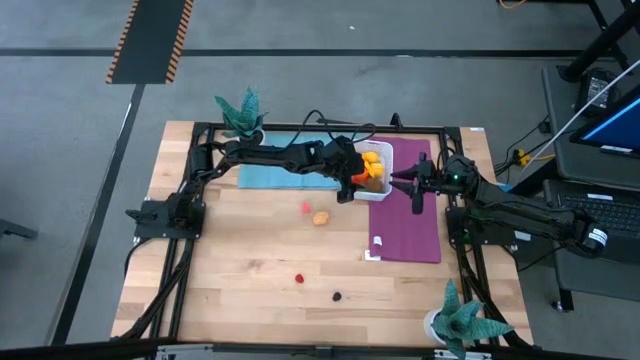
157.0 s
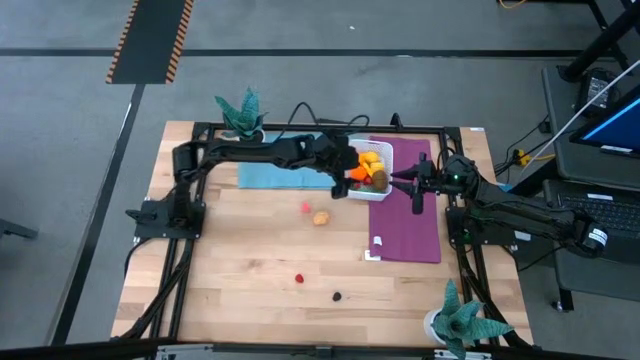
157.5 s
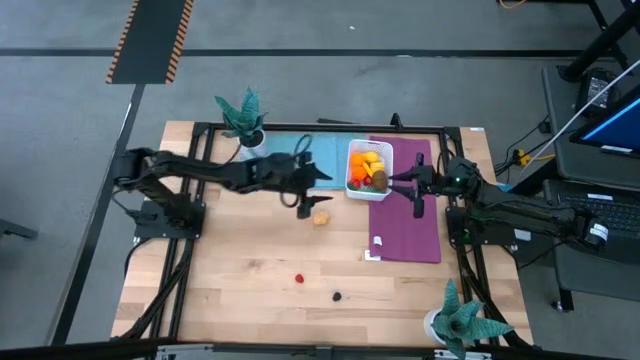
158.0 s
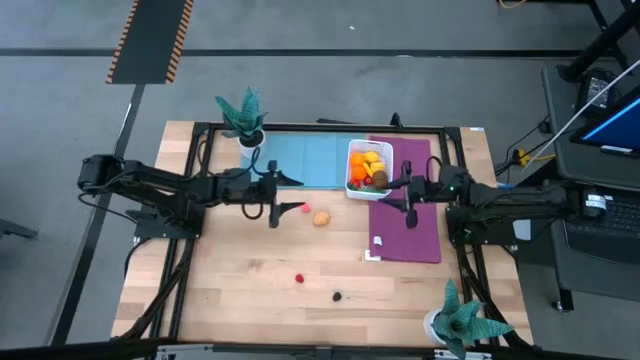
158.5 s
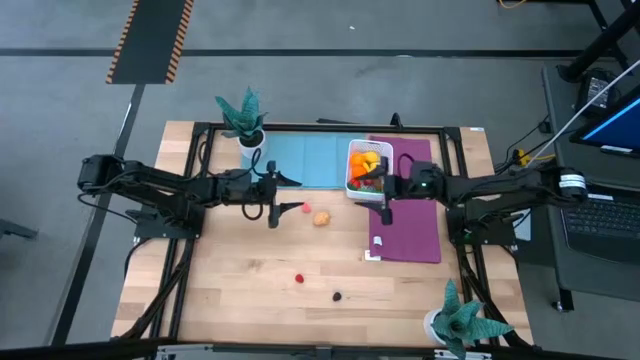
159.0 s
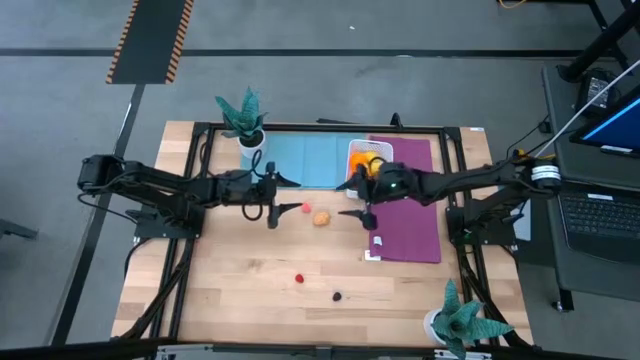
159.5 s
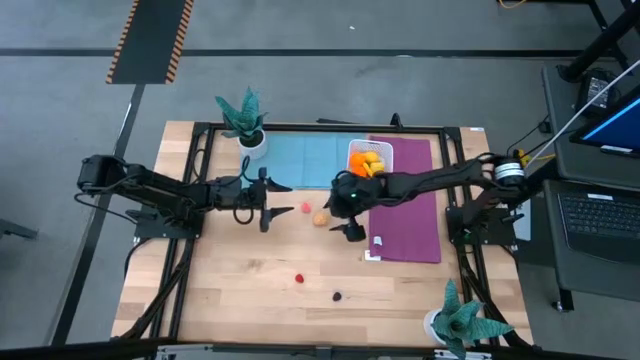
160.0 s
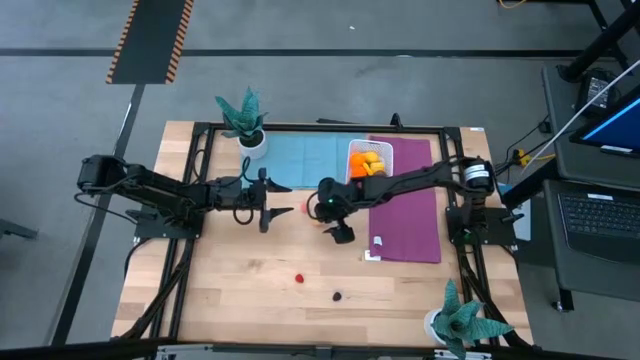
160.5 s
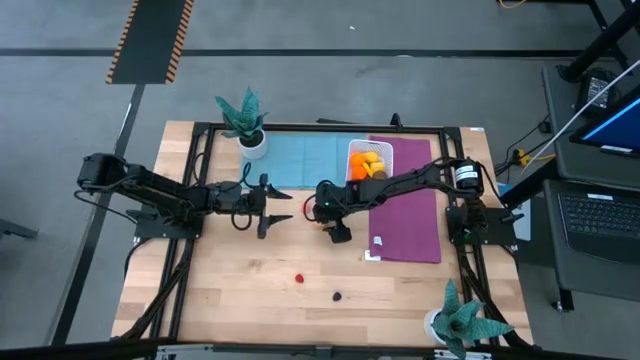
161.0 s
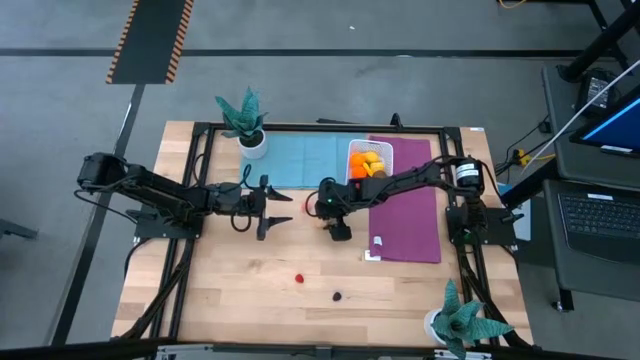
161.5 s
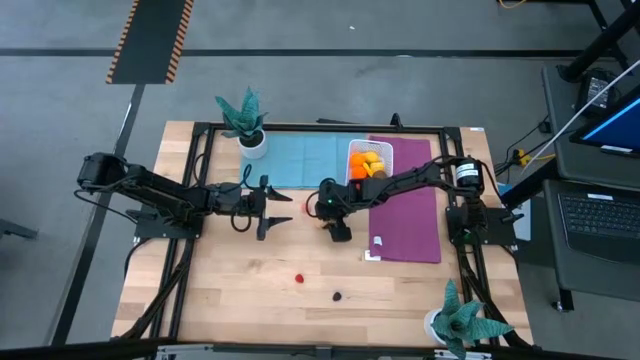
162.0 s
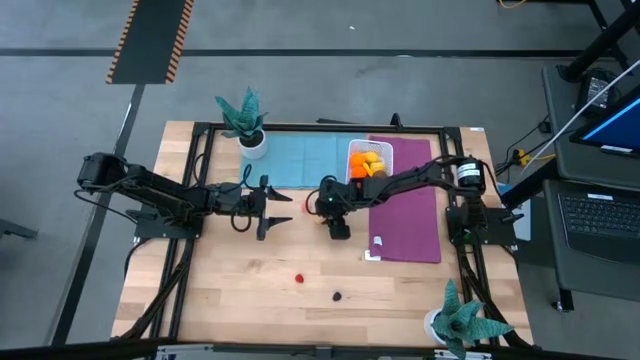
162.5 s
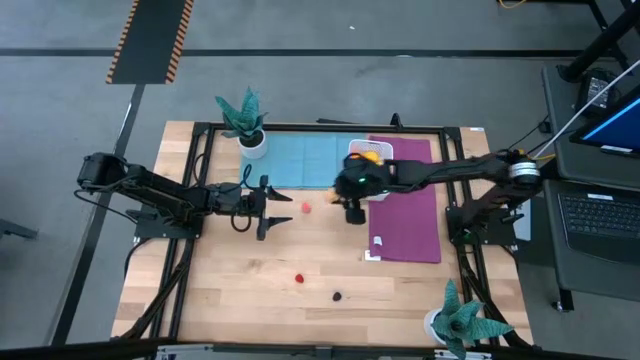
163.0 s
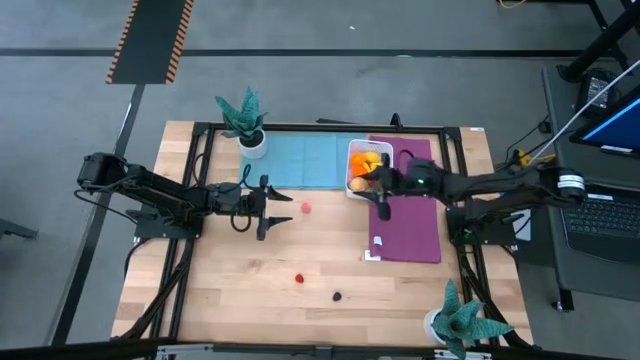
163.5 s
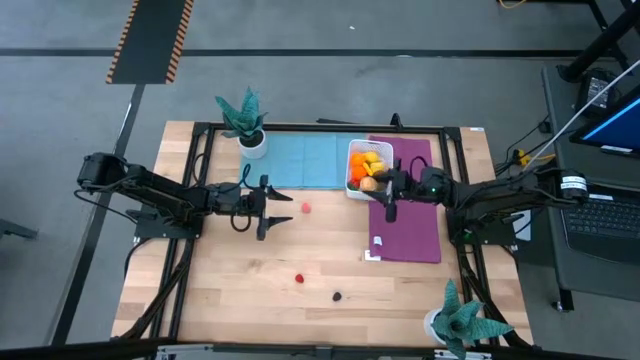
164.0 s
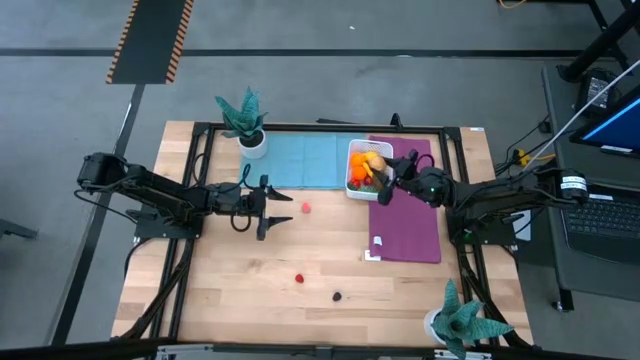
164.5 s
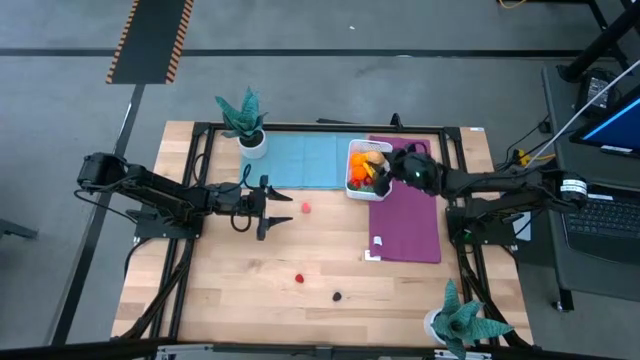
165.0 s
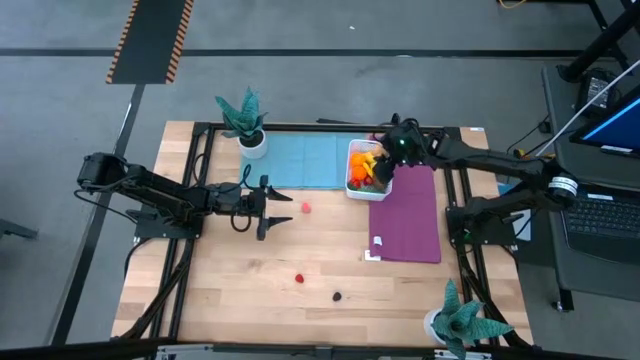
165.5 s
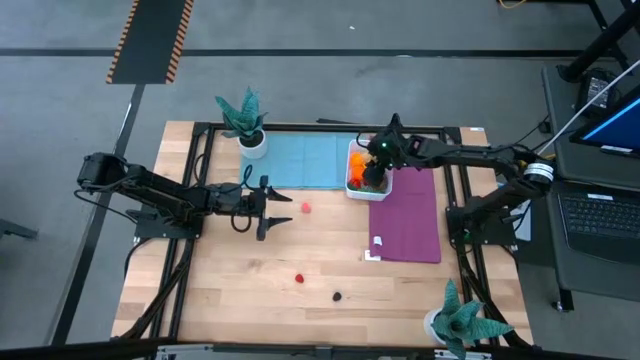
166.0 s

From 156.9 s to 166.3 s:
Task: Pick and placing Produce into tupperware
Put the brown potato into the white container

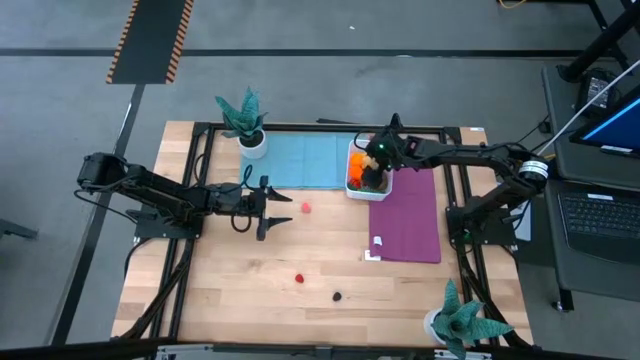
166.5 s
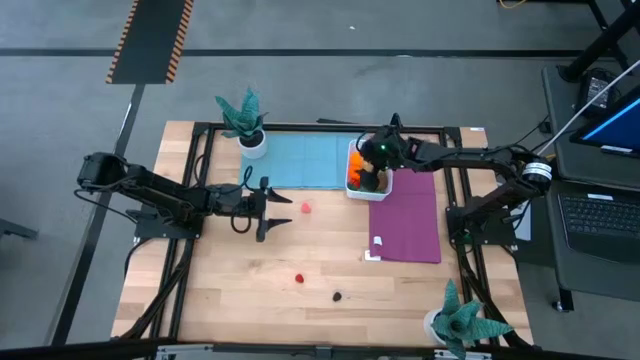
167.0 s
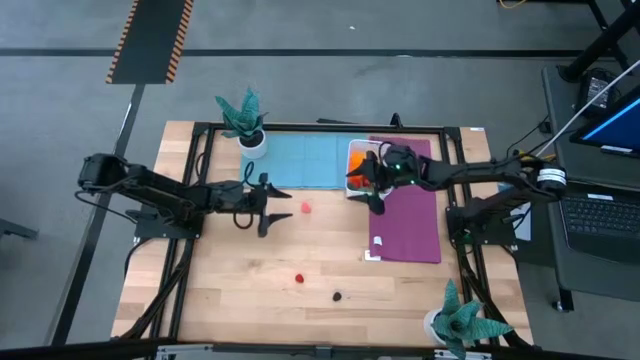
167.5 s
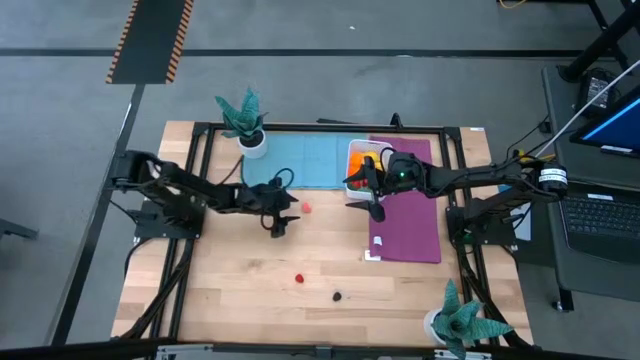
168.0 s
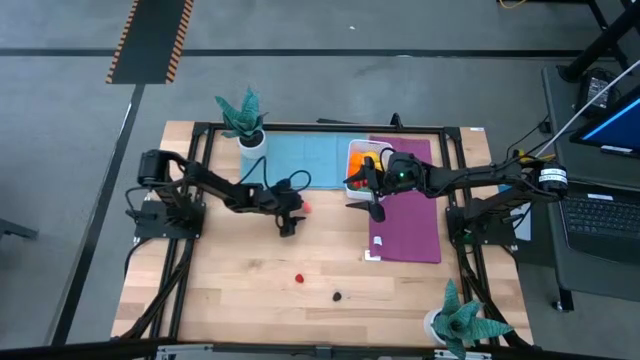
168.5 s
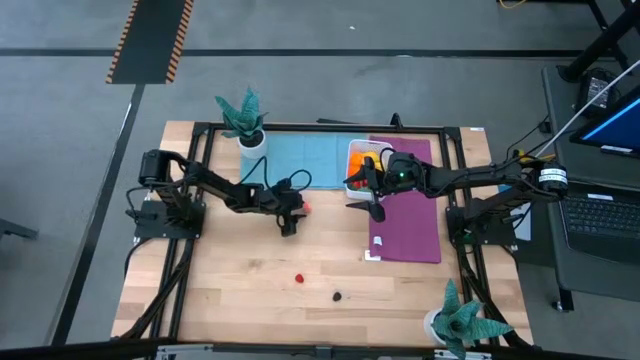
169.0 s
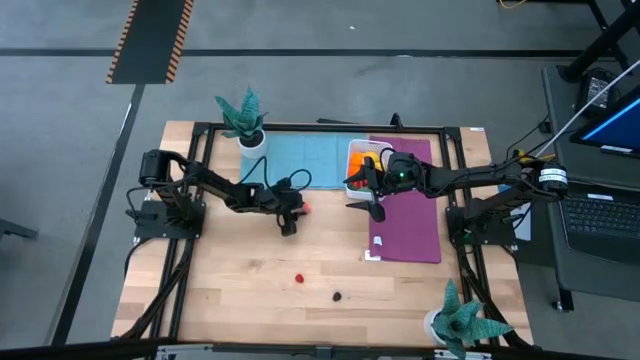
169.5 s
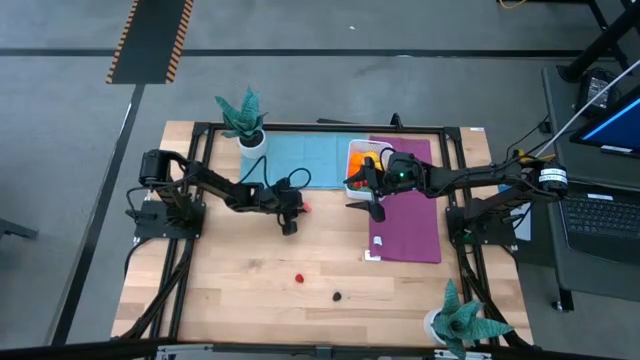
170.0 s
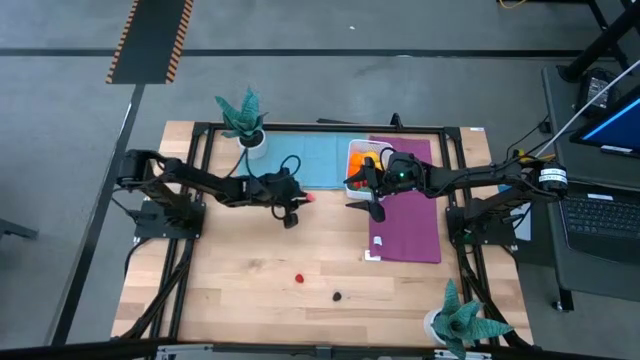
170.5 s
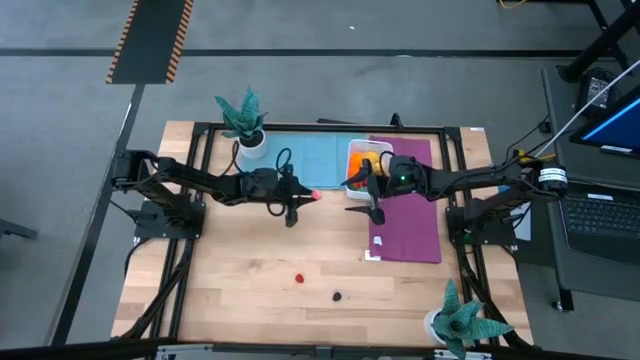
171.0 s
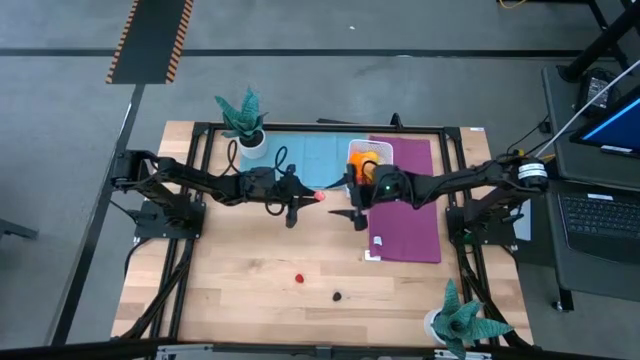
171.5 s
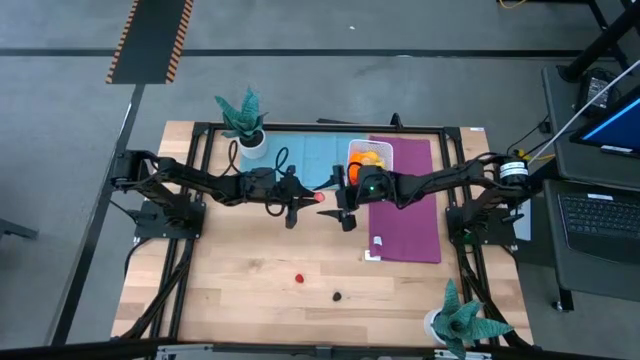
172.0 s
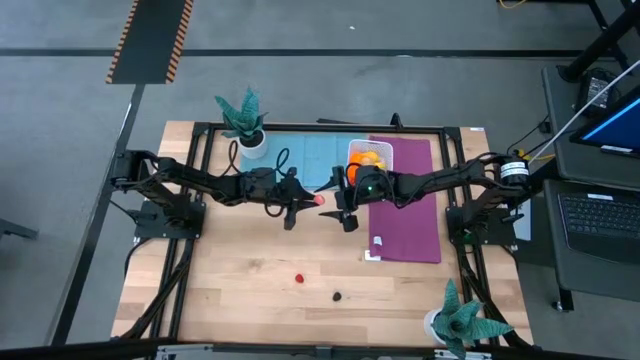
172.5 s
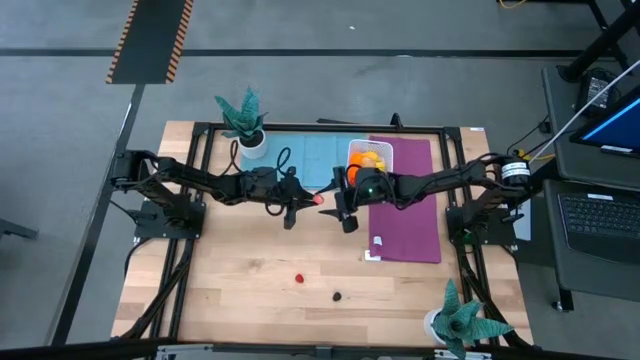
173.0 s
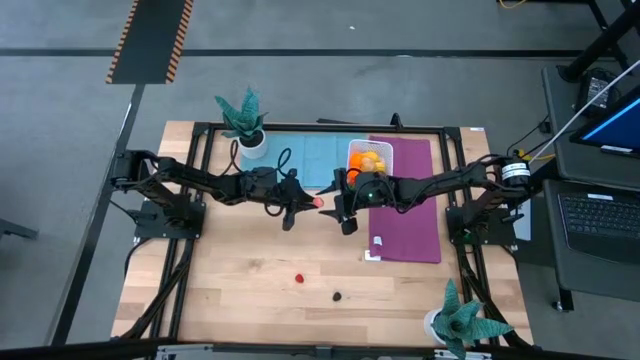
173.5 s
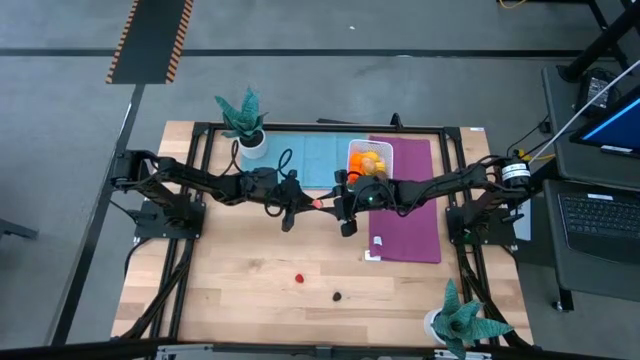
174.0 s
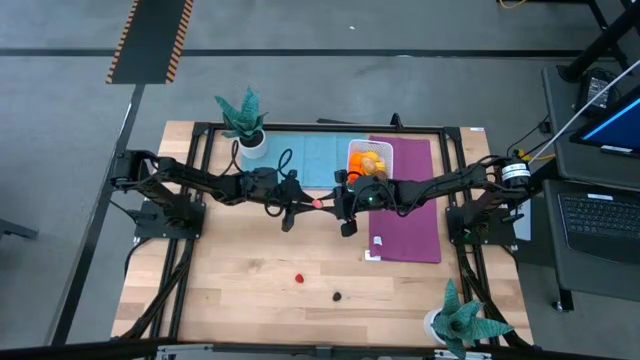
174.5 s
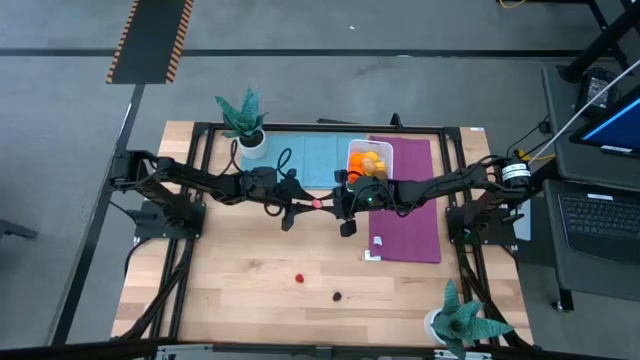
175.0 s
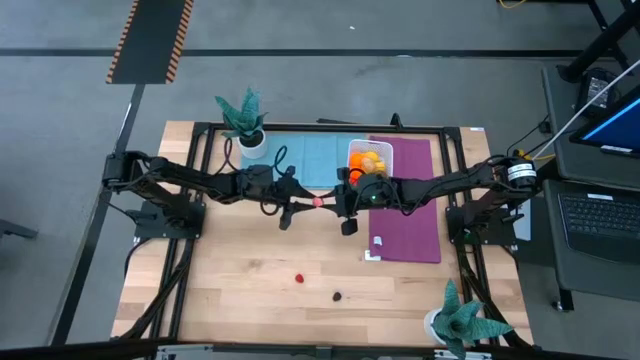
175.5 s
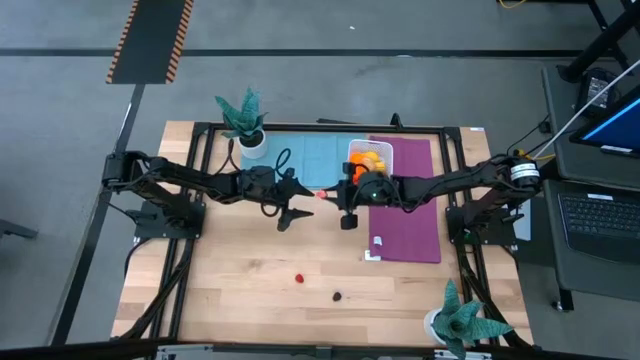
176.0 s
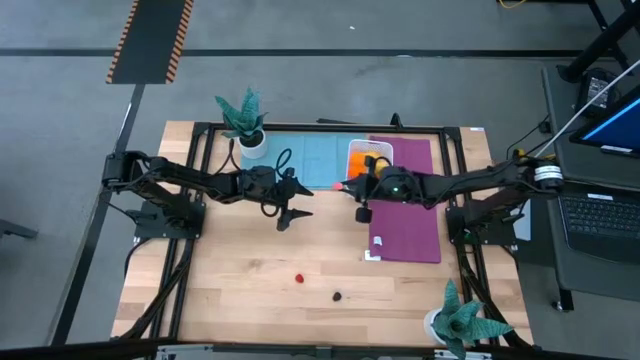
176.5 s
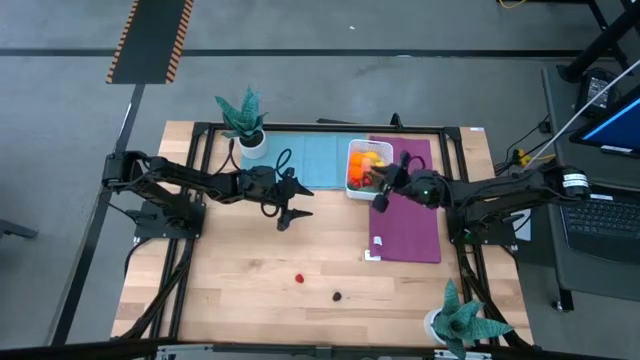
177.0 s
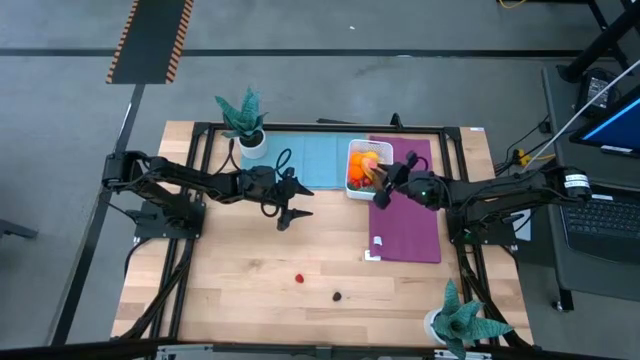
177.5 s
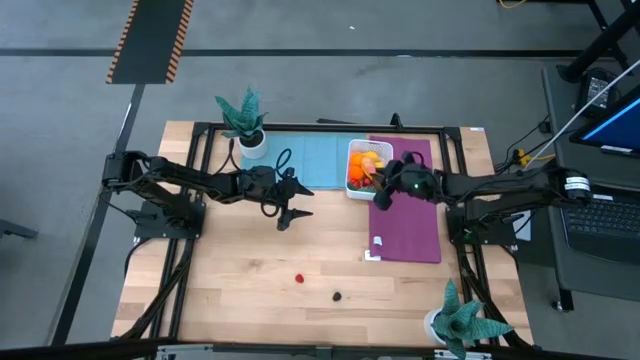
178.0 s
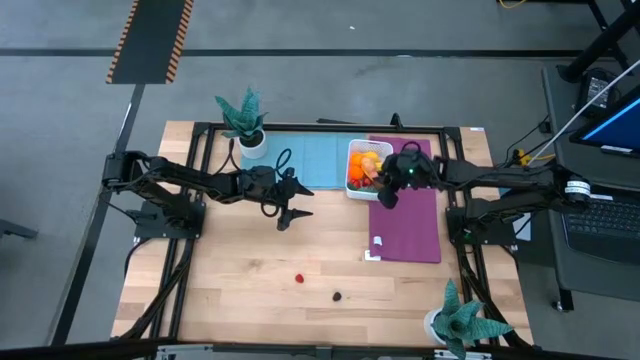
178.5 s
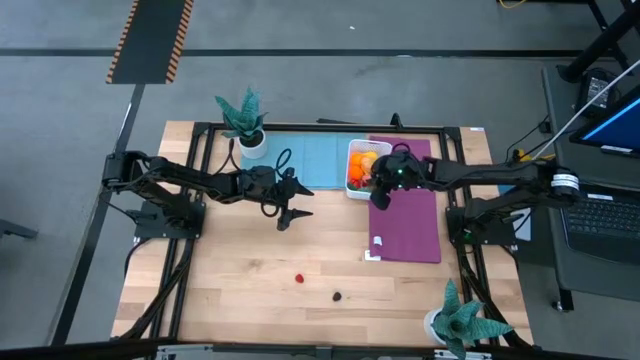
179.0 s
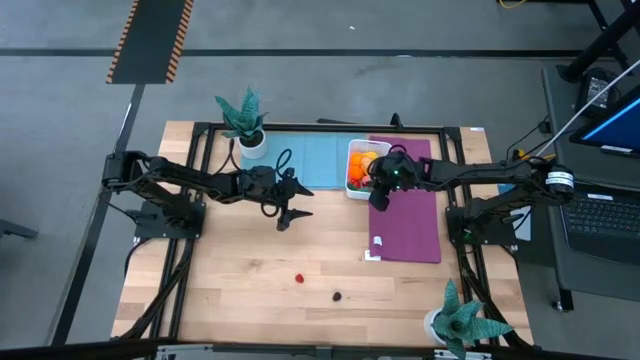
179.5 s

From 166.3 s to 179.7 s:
Put the orange peach into the white container
